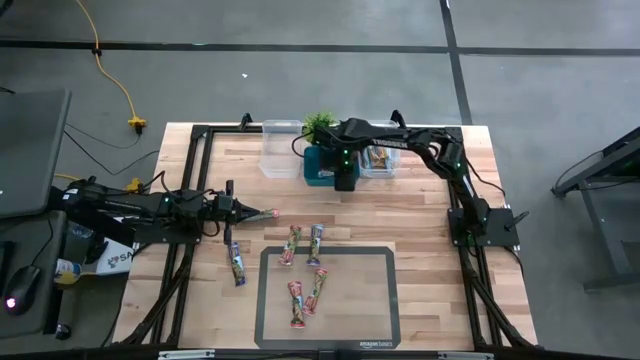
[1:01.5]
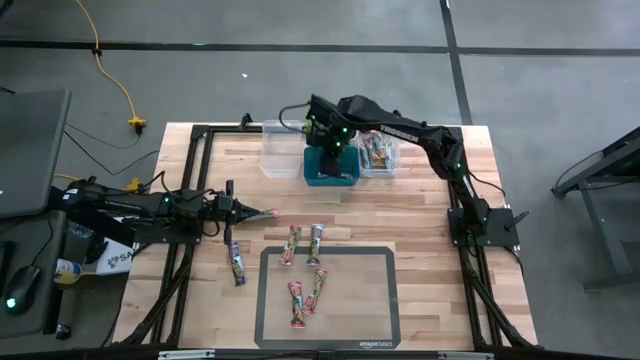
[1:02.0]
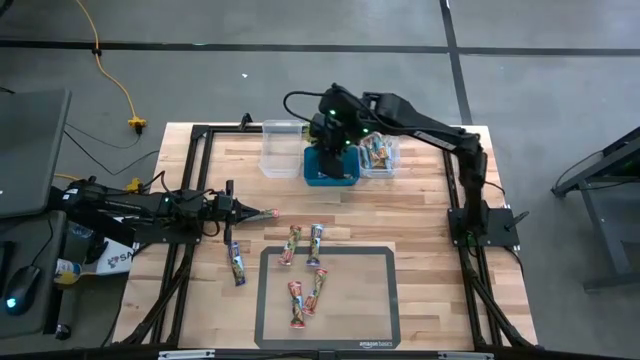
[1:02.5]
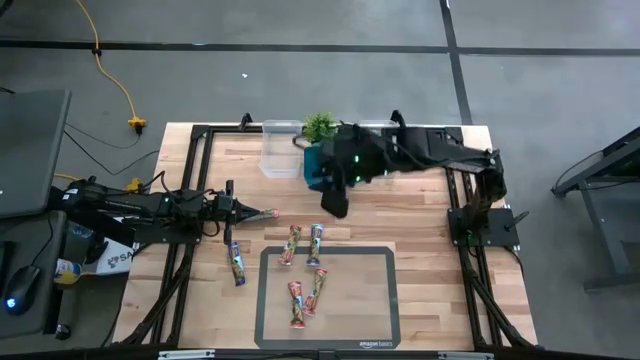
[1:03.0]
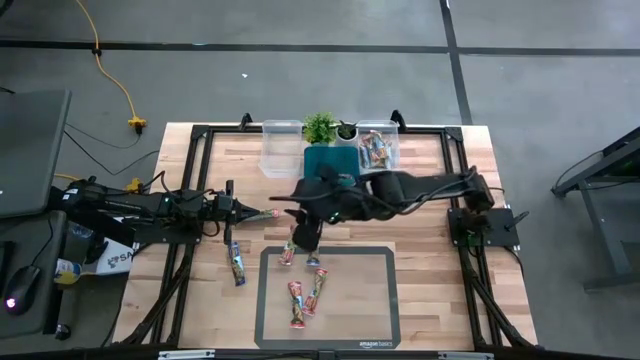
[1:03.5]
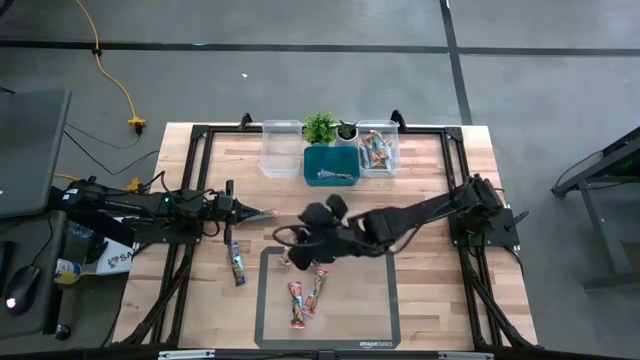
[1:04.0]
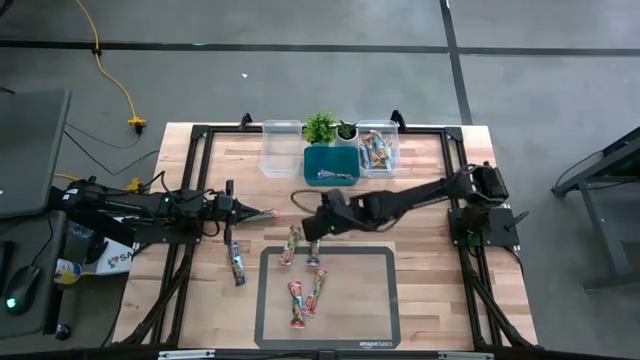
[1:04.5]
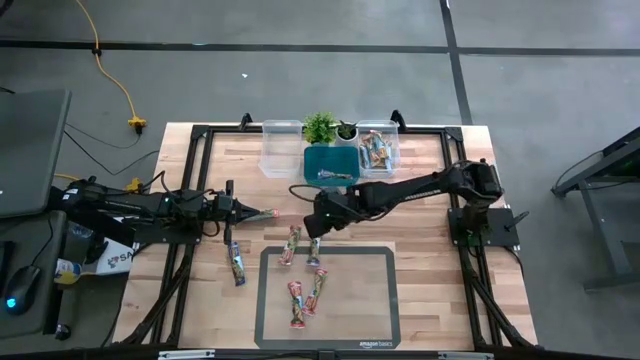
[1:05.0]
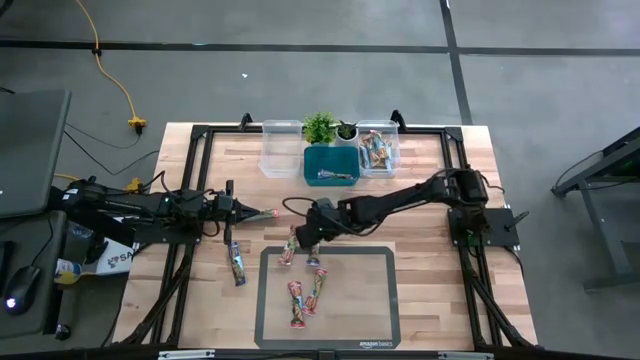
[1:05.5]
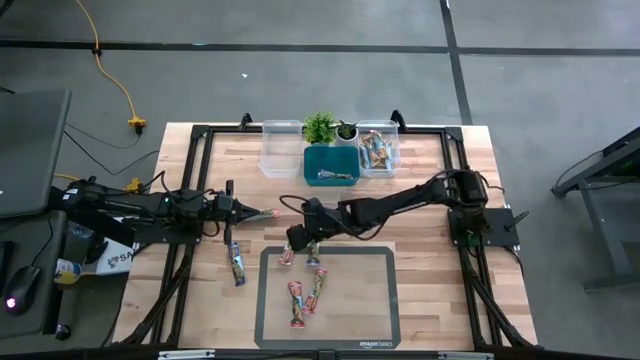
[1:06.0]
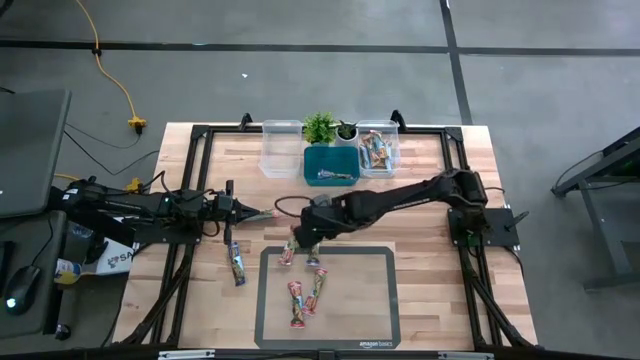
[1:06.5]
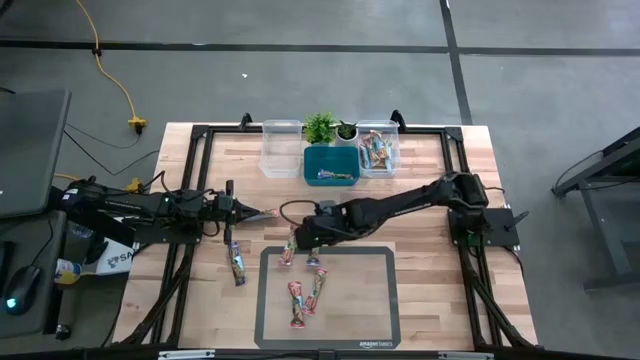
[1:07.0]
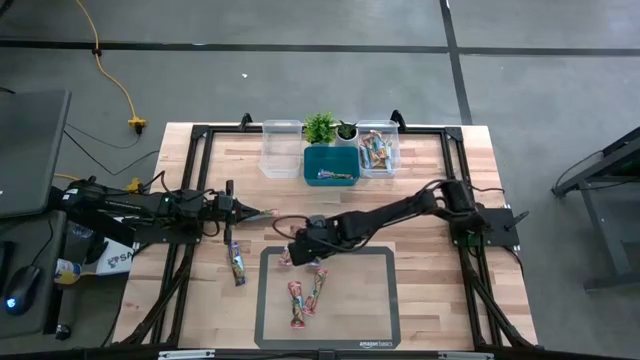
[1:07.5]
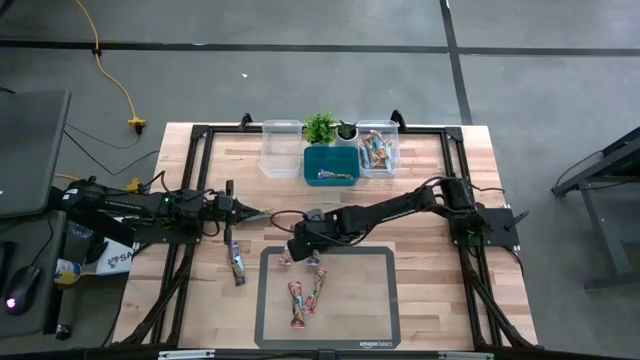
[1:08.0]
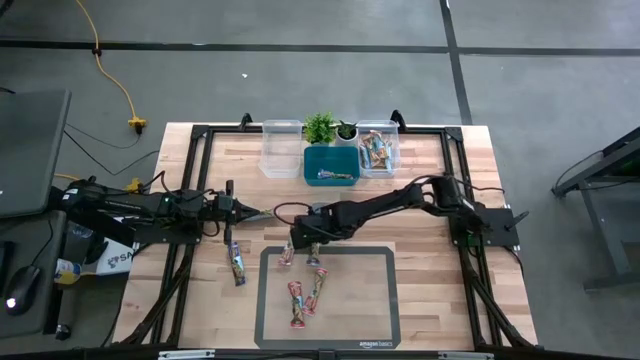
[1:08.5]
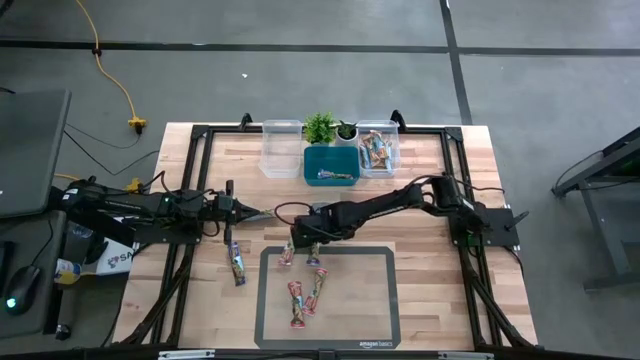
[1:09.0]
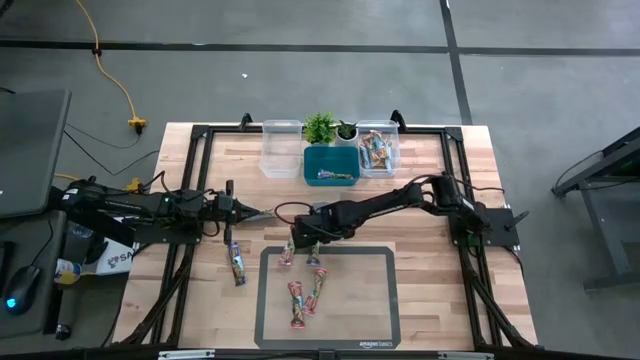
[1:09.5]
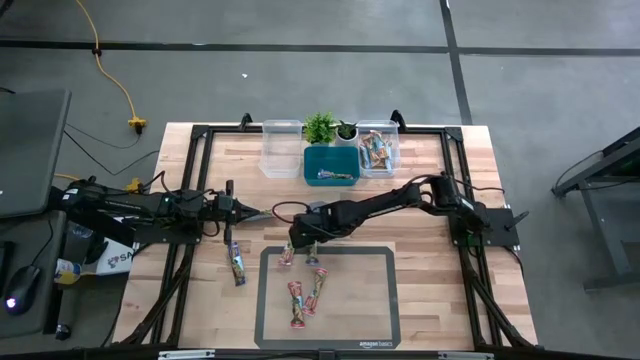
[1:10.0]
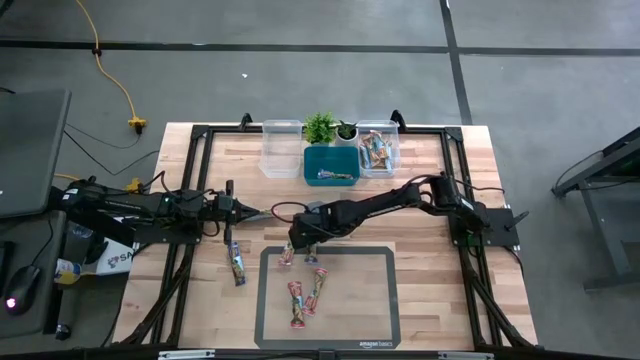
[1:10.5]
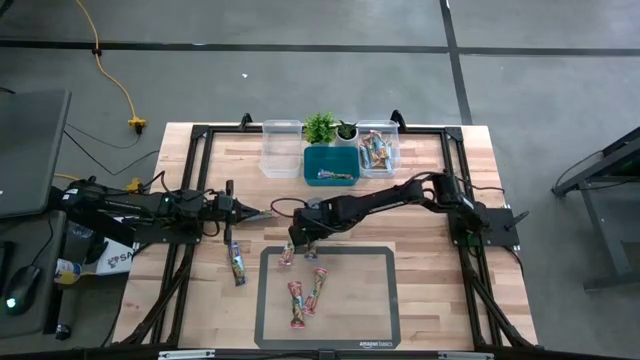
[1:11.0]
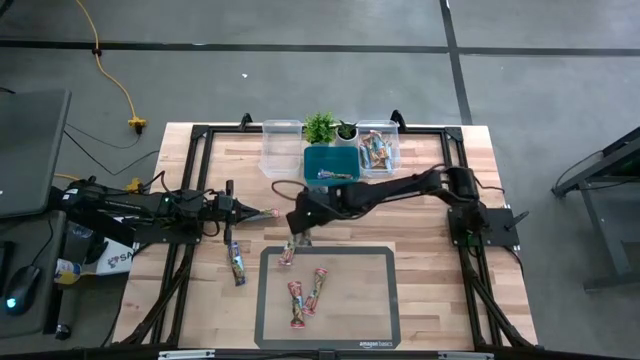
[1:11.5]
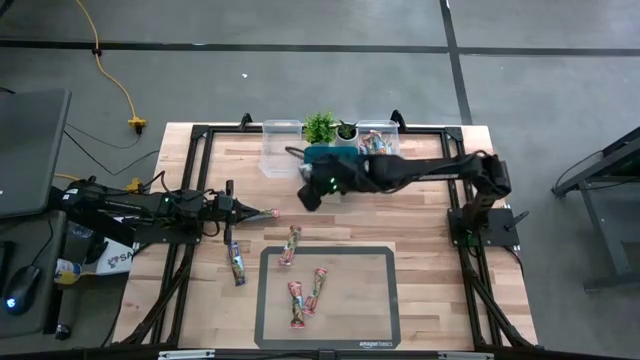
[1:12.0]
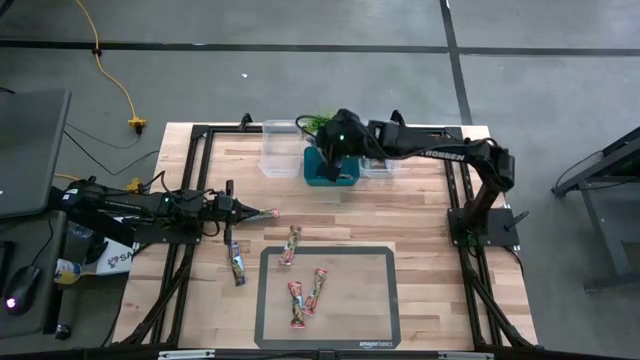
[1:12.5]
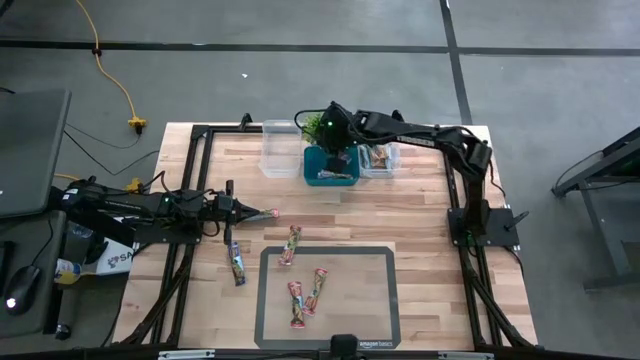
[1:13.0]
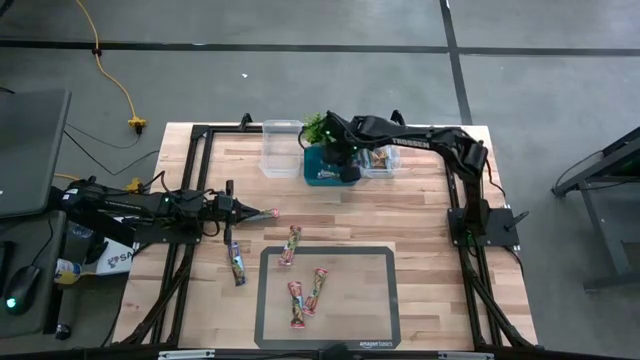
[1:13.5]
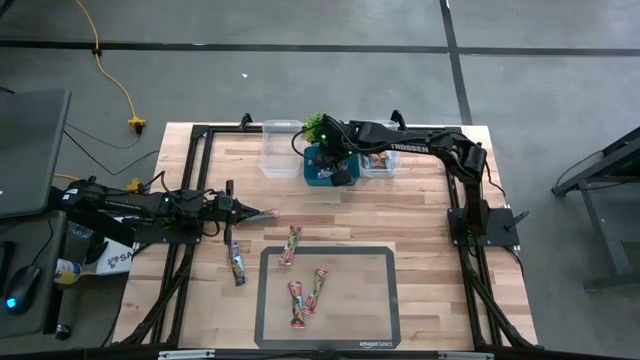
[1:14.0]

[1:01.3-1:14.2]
Task: Pick and place Granola Bars by type
Put the blue granola bar into the blue bin

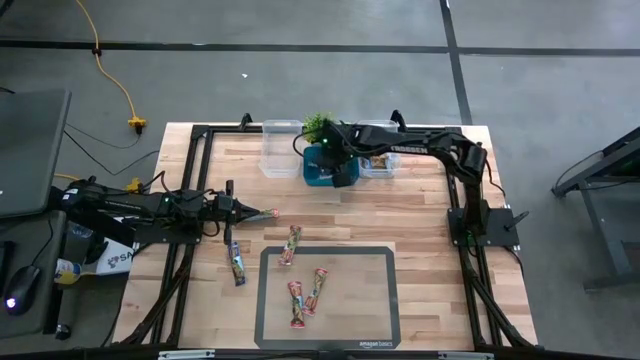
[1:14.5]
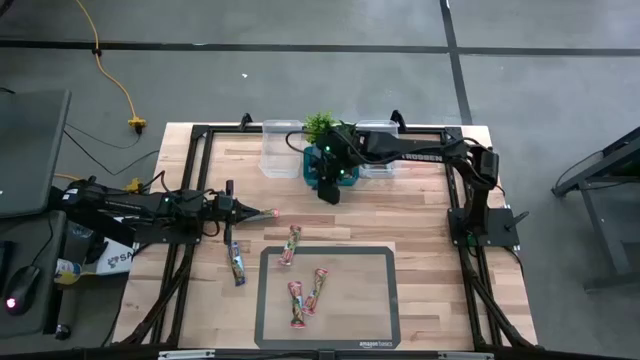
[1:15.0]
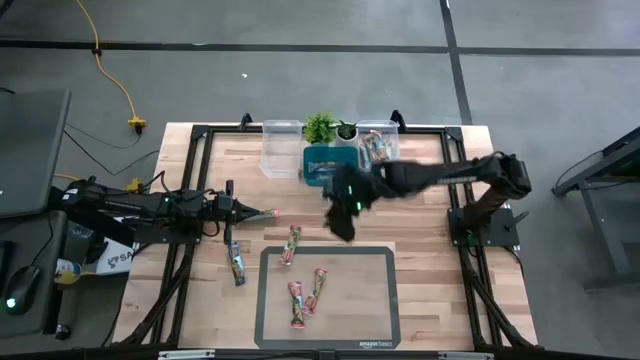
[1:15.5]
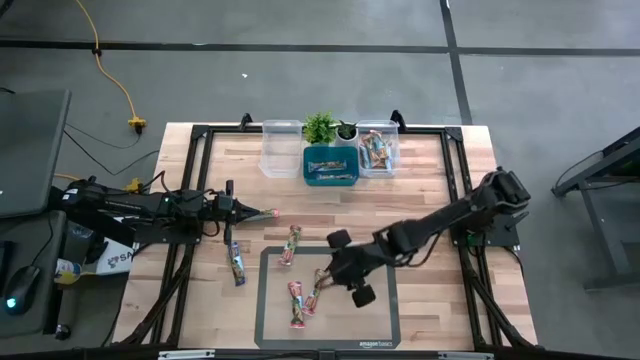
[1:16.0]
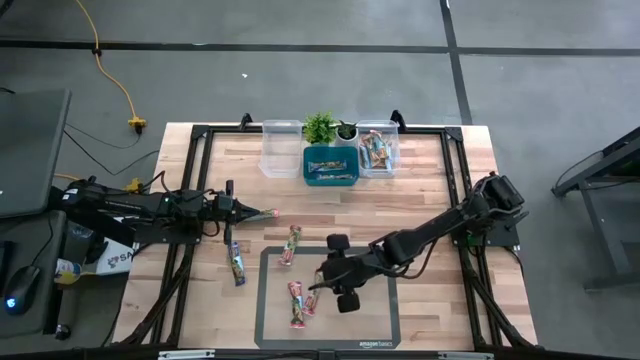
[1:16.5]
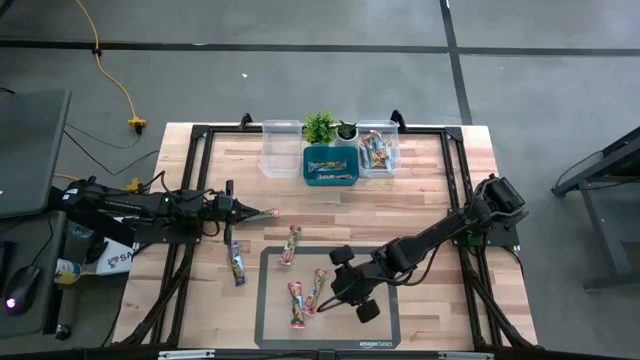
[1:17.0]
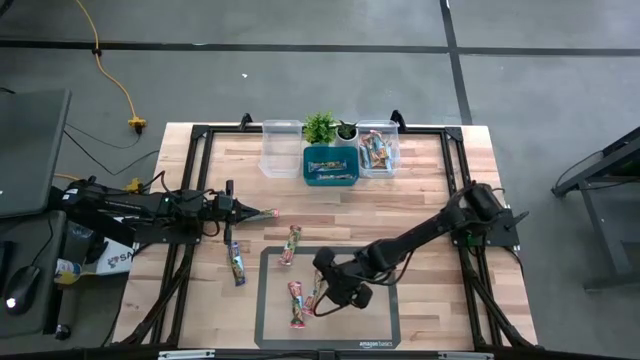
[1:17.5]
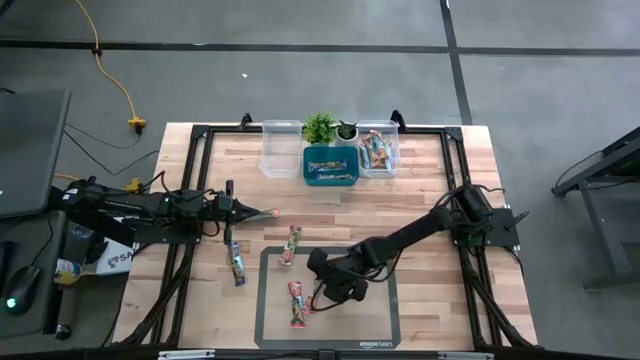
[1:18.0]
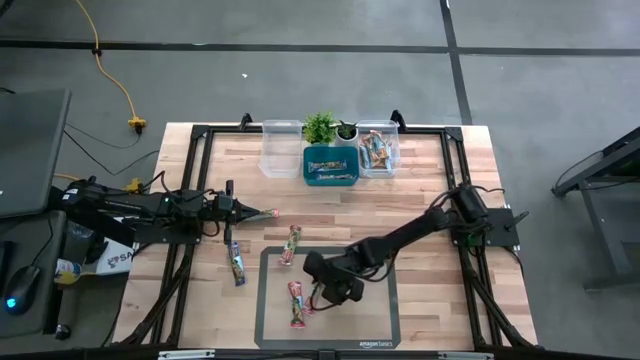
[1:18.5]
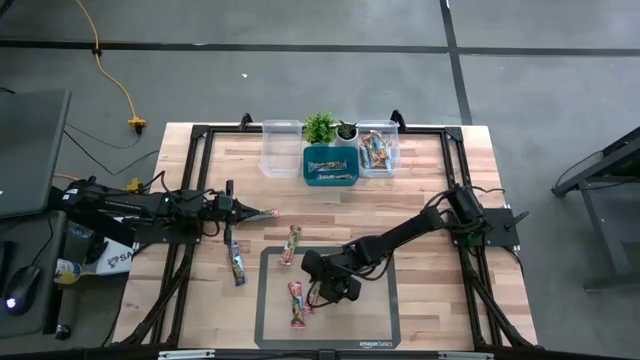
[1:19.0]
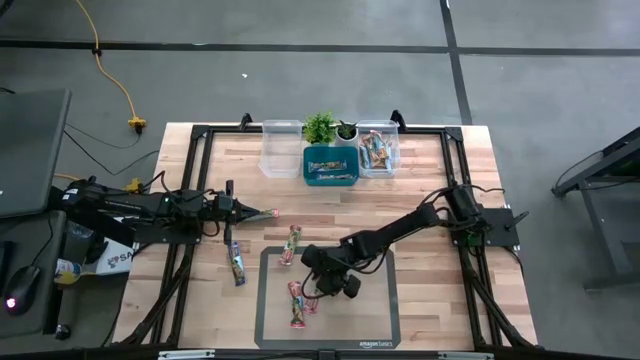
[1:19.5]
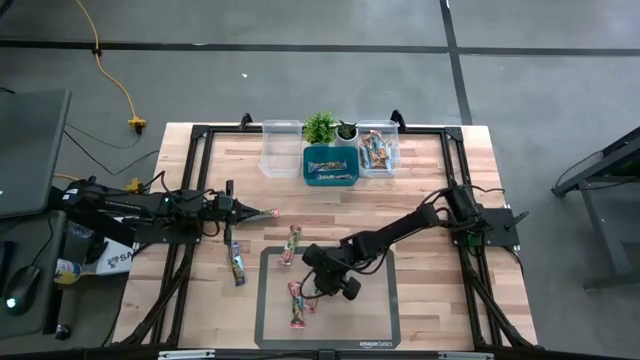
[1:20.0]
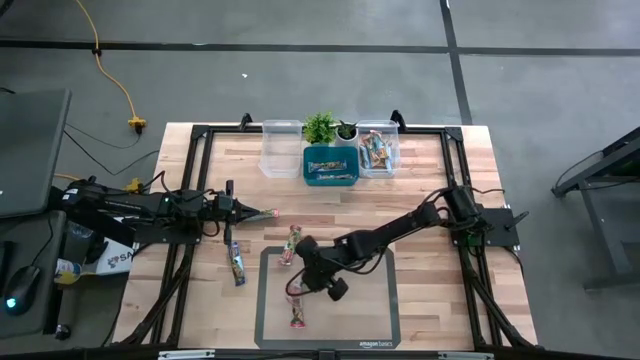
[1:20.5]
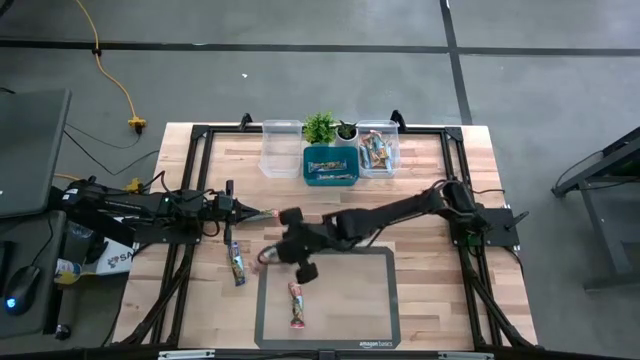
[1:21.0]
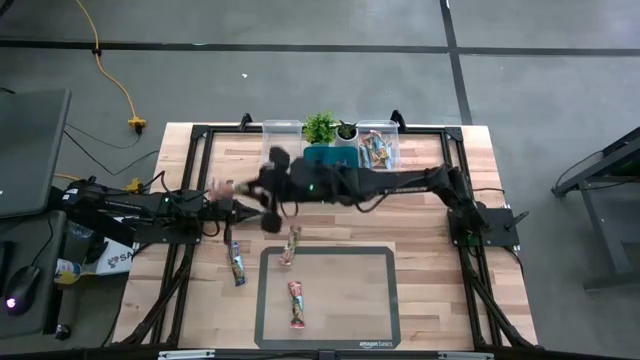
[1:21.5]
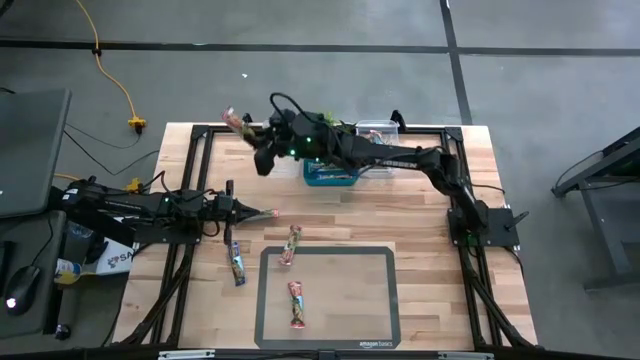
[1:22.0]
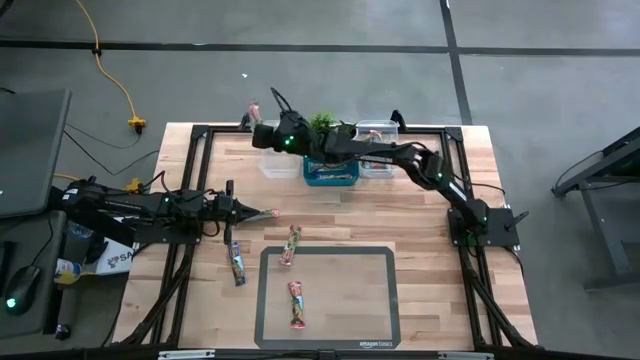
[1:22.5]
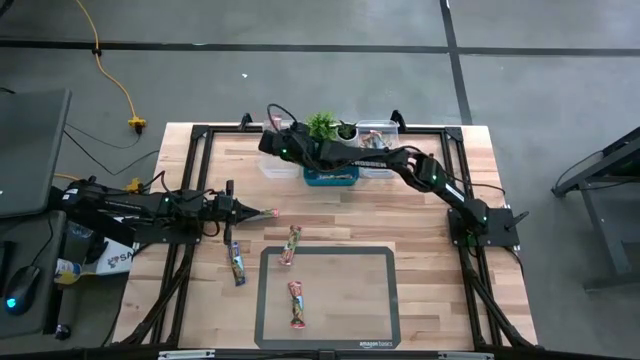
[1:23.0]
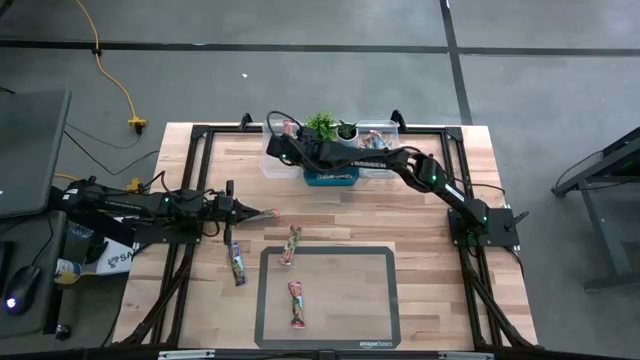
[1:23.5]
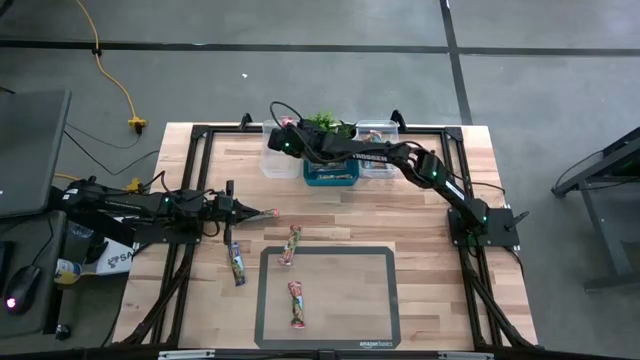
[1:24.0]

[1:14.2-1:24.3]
Put the red granola bar into the left transparent bin
